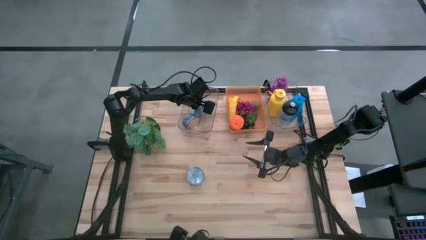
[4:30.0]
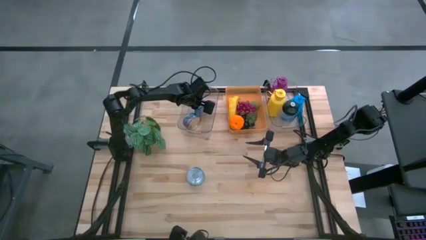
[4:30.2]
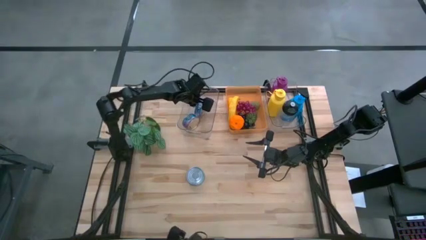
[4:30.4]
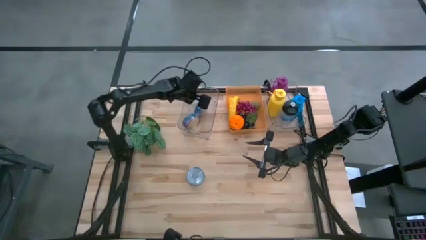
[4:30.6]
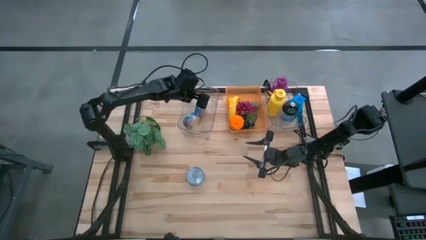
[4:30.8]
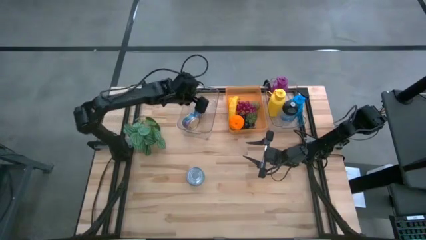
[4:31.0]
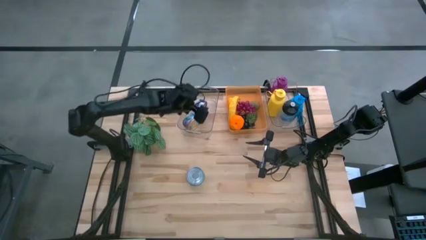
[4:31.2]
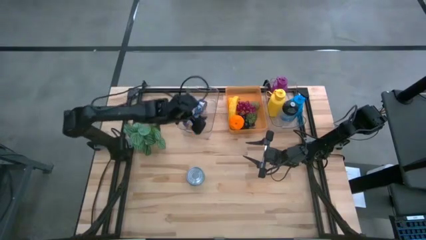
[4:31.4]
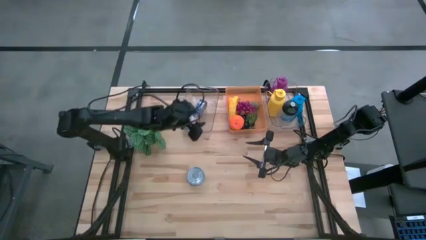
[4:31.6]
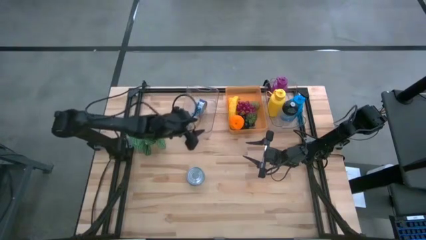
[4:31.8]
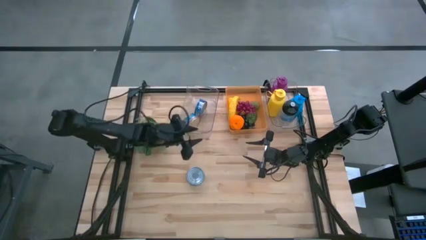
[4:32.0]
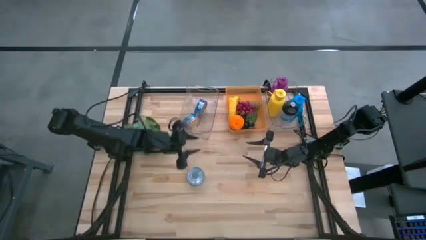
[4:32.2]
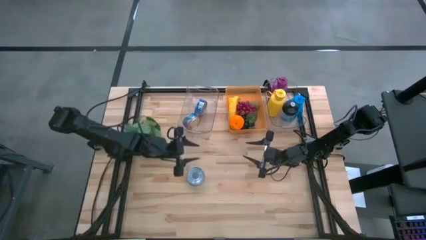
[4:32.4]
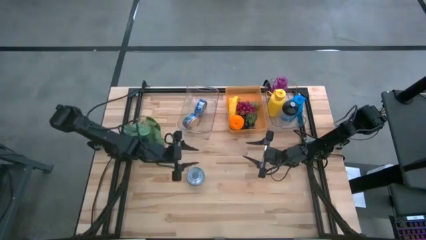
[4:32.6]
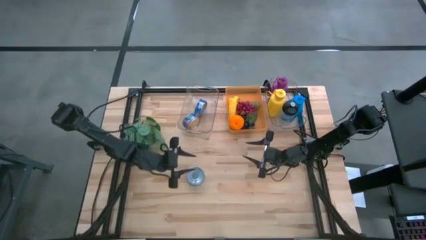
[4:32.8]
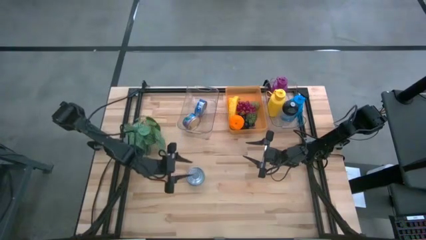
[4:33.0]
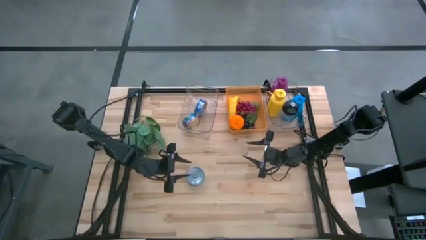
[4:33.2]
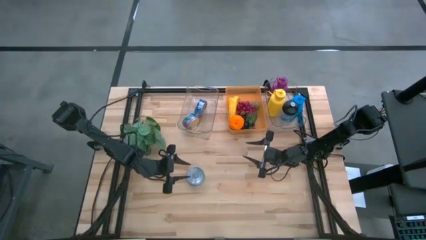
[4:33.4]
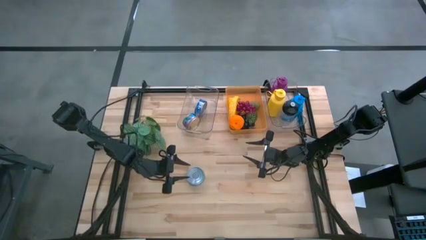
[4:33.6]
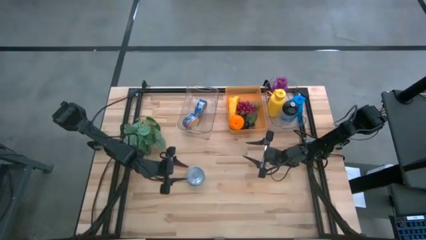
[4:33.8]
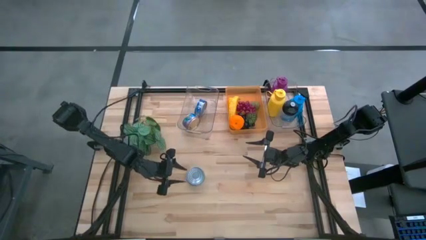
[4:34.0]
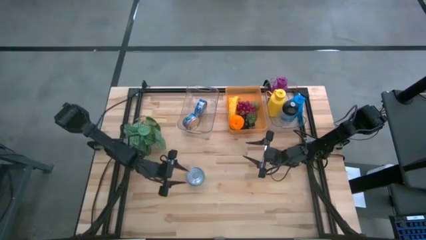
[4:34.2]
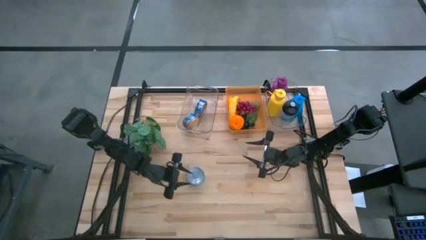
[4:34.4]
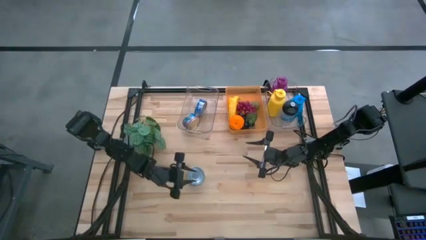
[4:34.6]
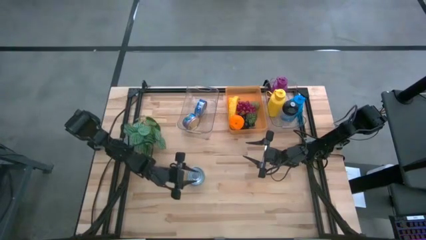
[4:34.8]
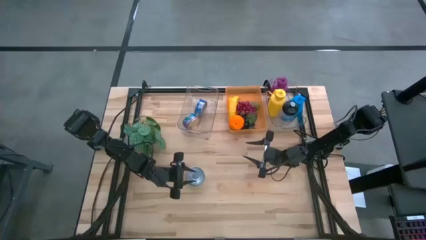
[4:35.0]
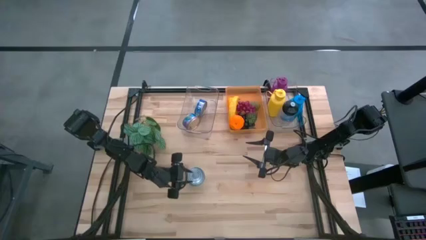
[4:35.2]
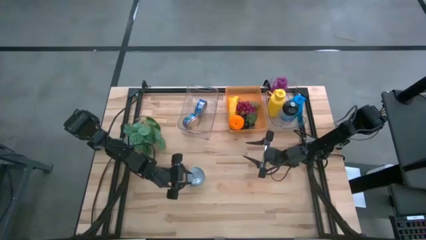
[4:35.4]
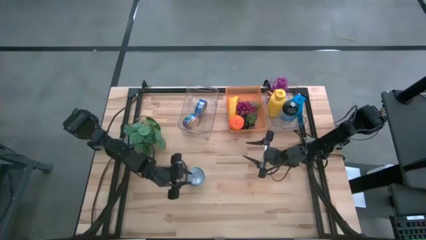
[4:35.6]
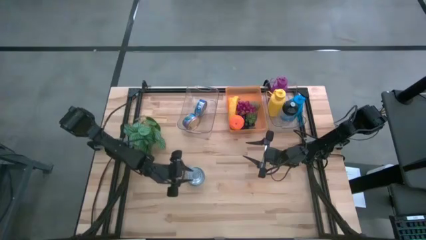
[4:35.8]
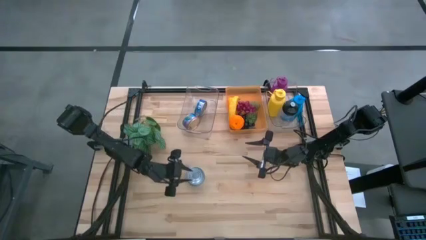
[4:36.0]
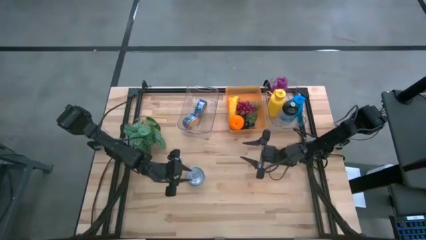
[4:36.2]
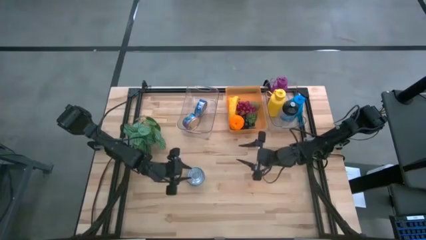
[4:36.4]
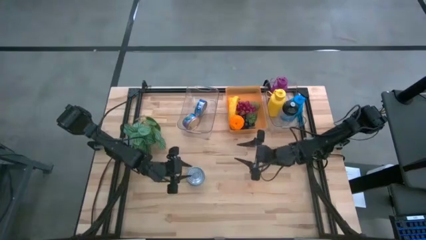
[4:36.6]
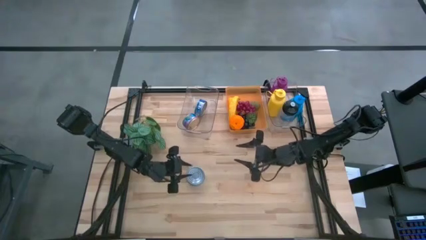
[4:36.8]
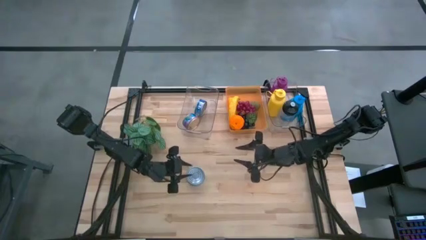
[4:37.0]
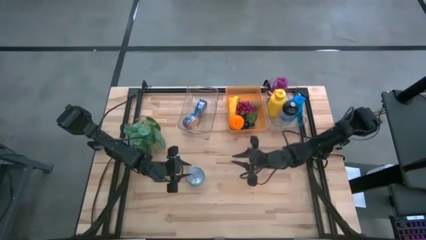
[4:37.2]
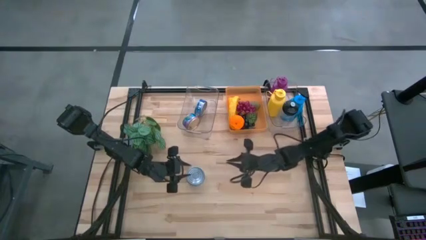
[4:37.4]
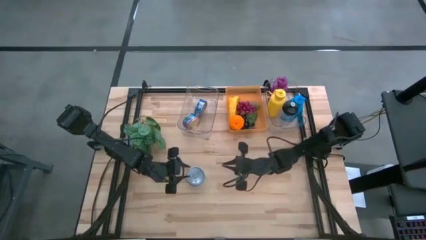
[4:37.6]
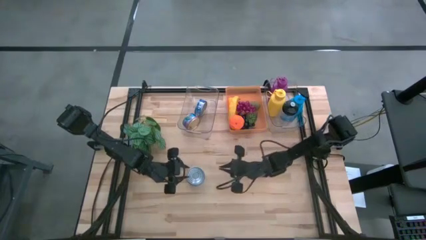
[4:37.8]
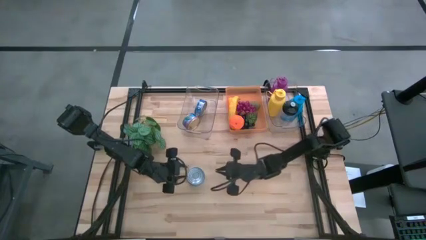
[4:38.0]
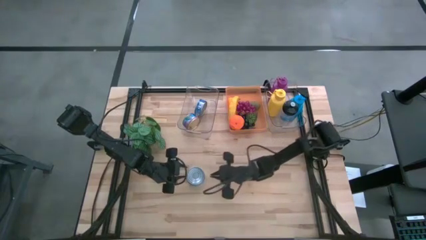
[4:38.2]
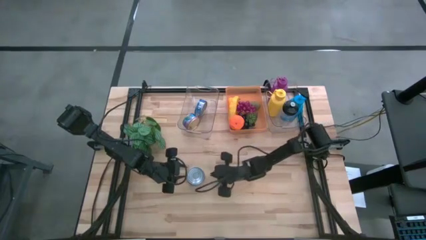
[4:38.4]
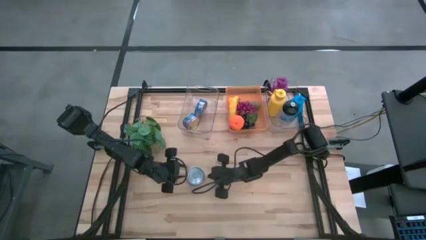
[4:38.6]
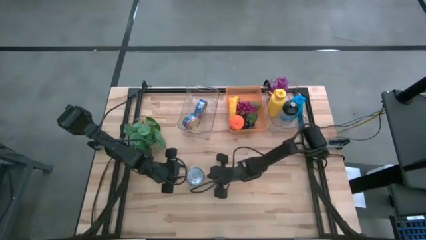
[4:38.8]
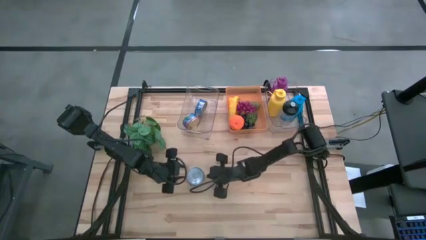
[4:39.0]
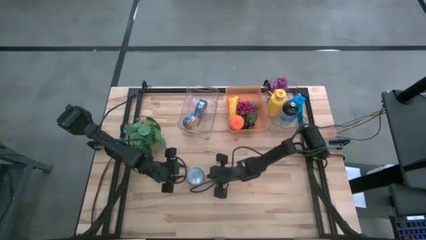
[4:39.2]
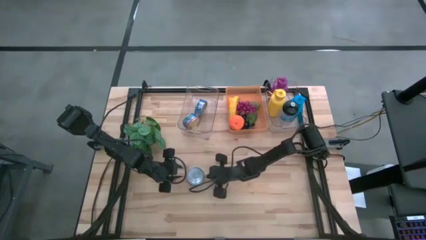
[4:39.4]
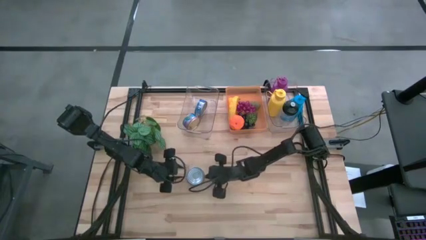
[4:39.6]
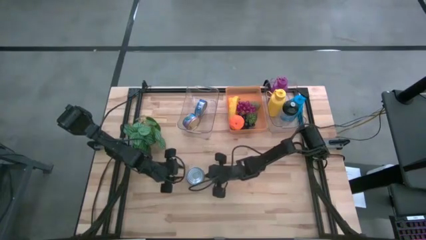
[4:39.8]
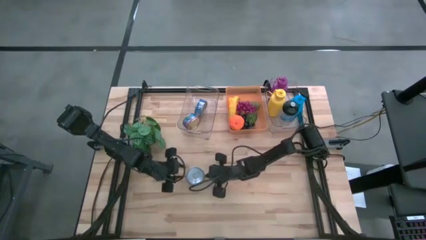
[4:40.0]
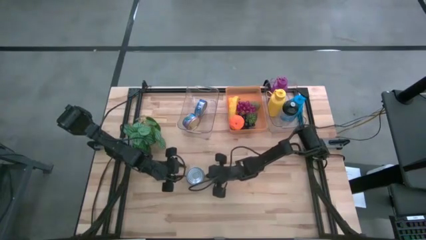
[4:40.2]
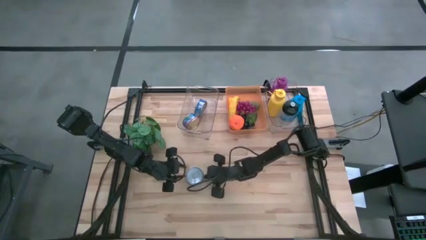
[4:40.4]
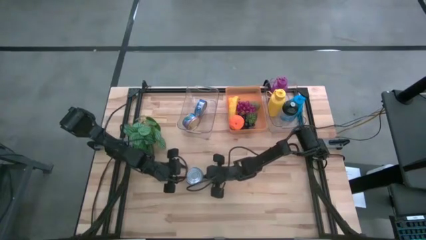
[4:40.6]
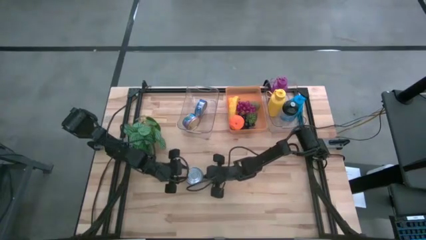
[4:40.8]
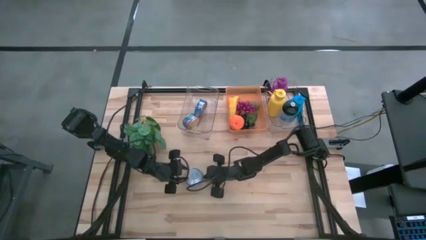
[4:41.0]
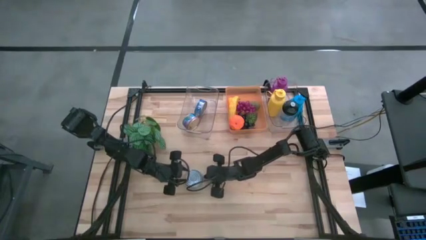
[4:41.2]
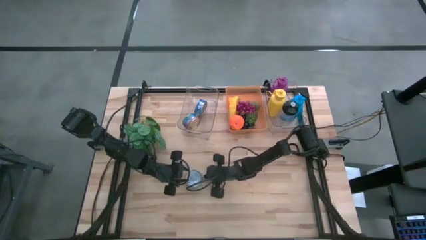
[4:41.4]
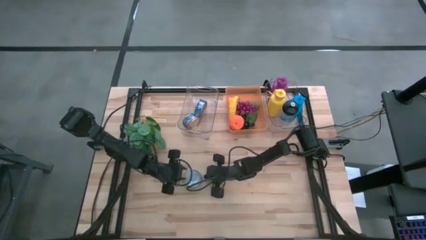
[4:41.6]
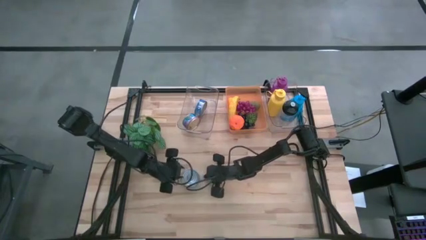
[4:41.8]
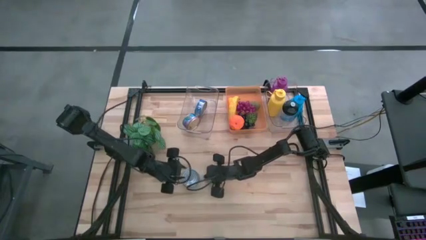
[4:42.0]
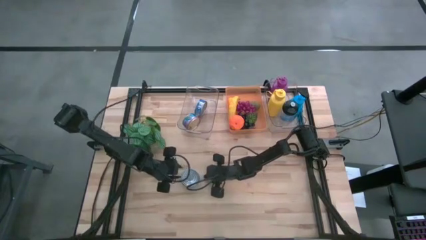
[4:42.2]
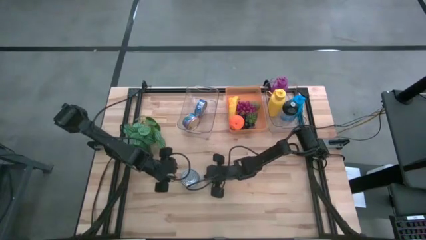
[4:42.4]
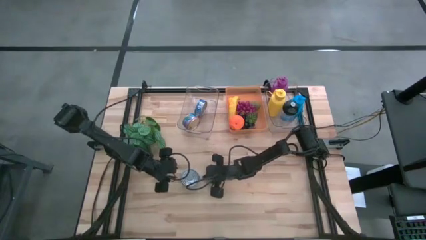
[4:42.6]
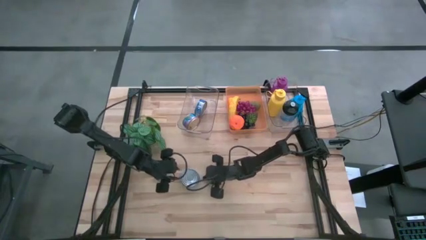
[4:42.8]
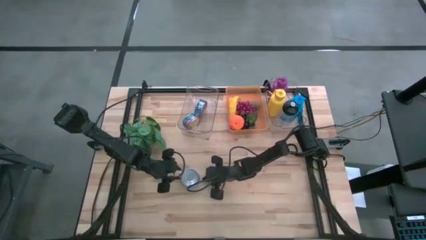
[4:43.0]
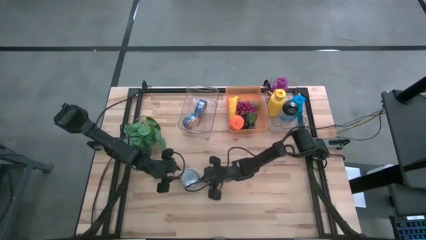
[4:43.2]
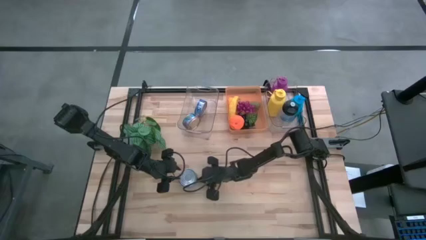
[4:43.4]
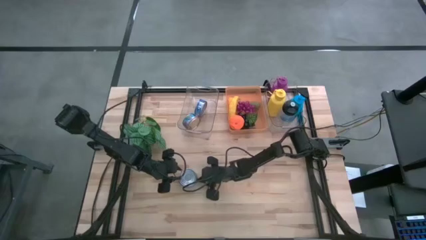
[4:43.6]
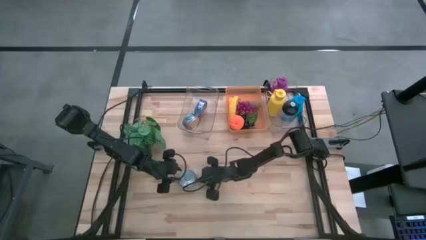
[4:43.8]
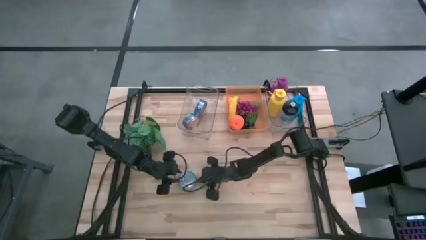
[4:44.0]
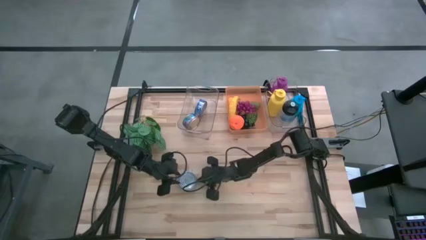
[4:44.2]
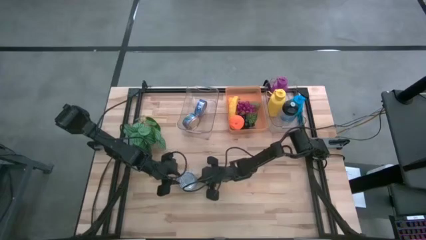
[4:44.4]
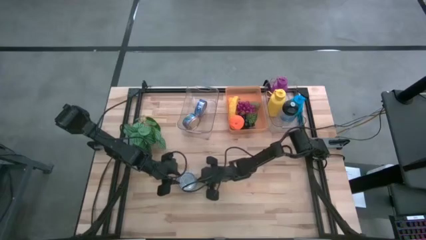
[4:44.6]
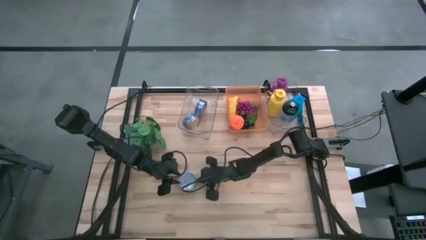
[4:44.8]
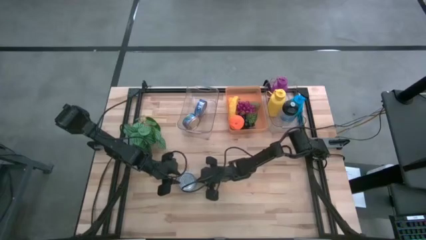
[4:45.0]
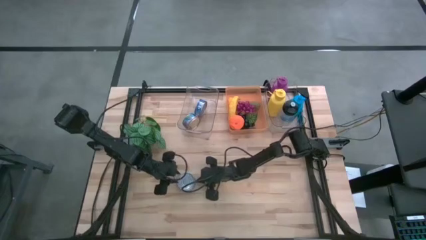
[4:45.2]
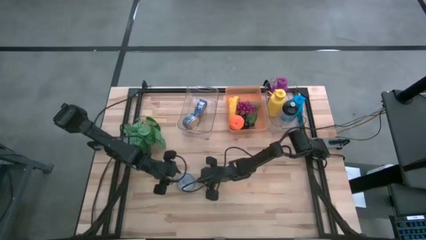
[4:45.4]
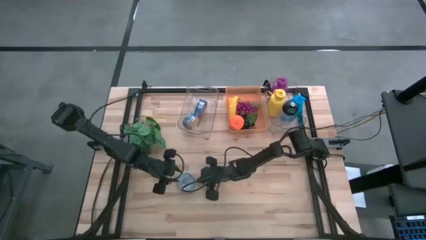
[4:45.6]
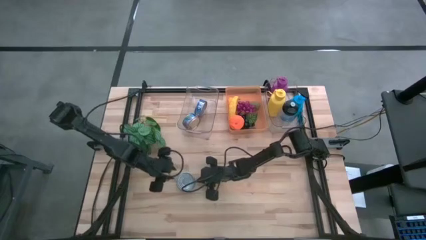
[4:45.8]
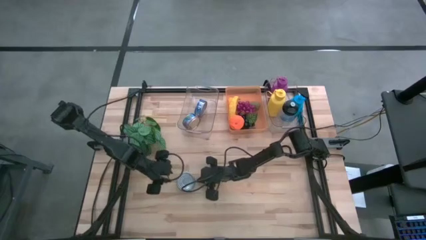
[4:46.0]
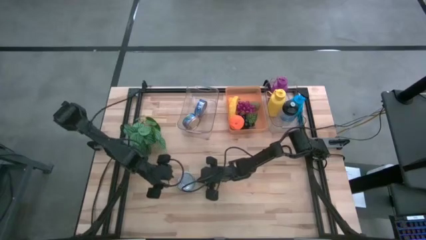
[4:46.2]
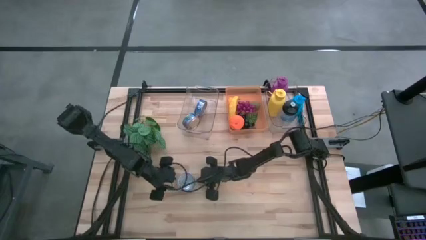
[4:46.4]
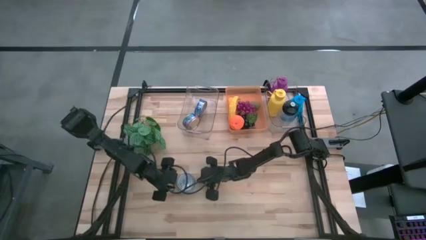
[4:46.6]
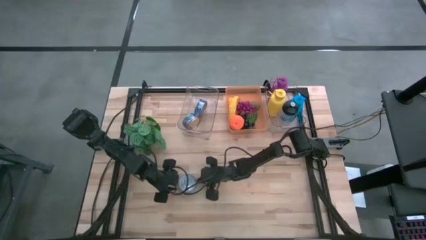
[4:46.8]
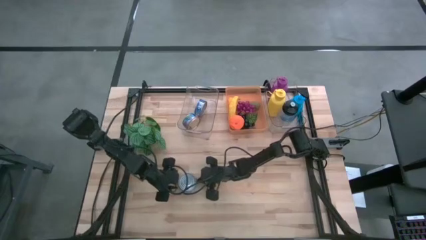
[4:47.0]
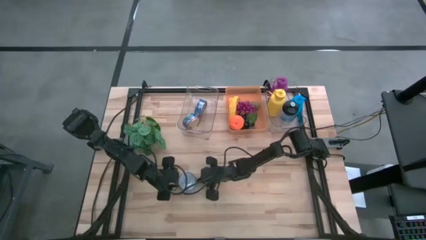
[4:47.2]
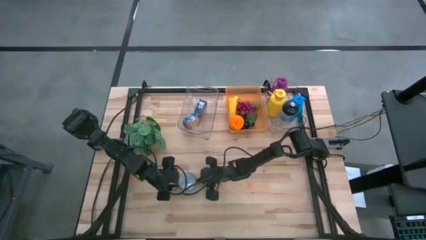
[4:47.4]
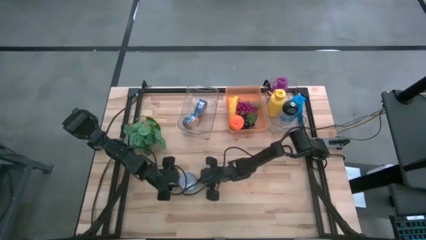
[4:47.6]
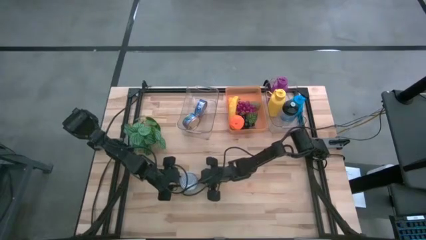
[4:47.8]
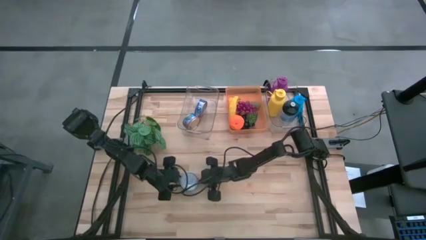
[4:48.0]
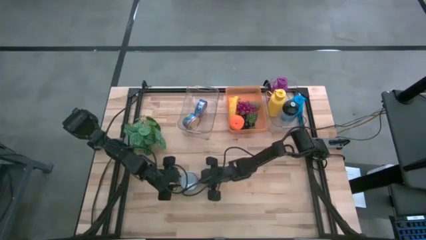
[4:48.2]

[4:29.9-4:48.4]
Task: Pick & Place Food Item
Put the blue and yellow tuna can into the left transparent bin
